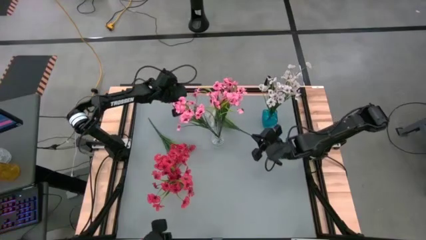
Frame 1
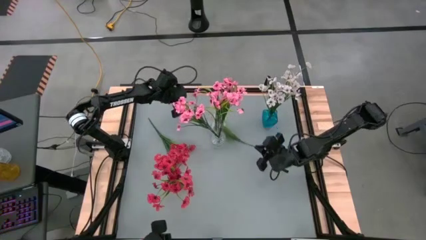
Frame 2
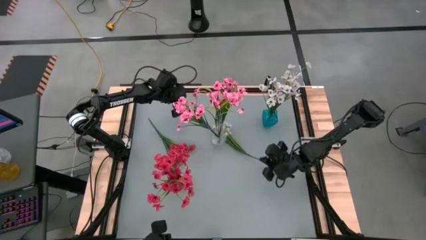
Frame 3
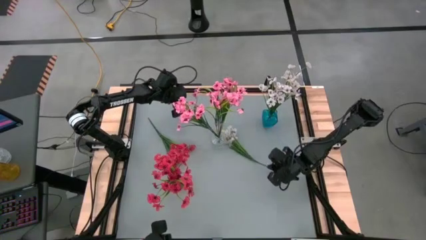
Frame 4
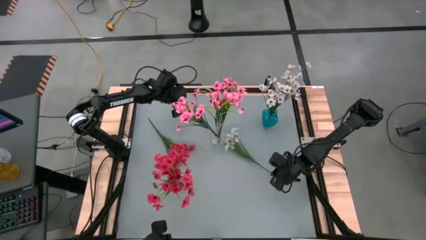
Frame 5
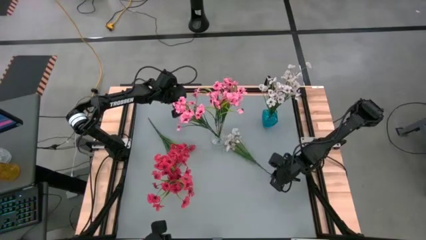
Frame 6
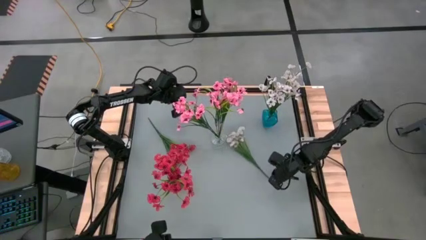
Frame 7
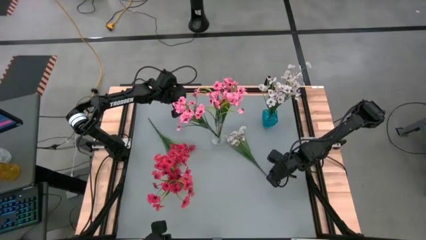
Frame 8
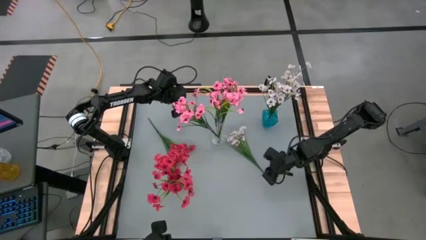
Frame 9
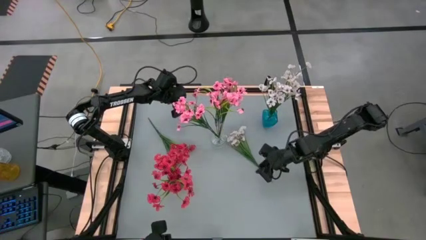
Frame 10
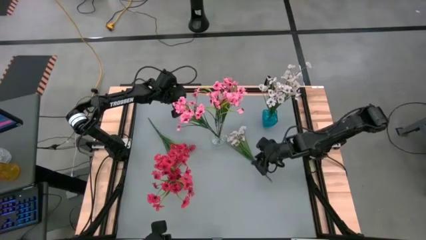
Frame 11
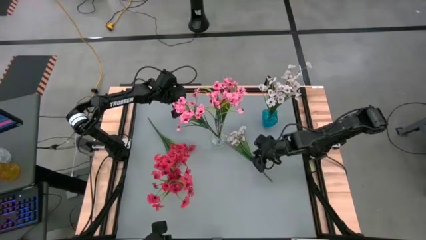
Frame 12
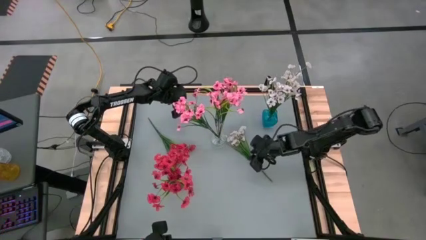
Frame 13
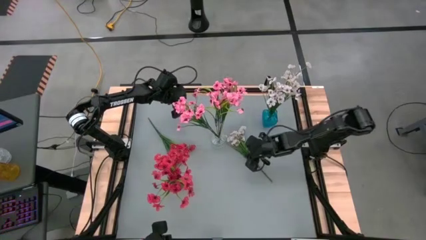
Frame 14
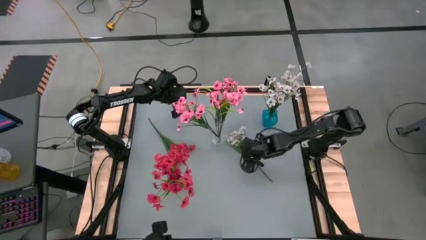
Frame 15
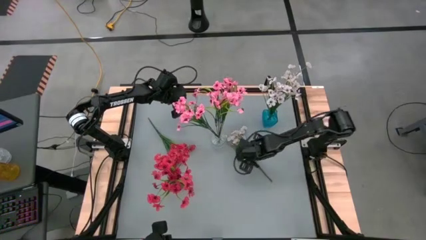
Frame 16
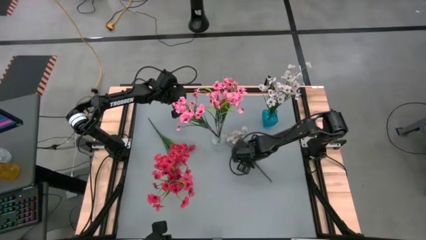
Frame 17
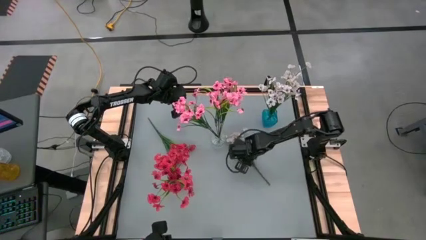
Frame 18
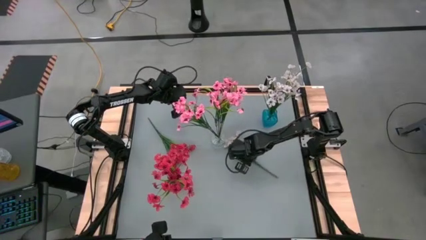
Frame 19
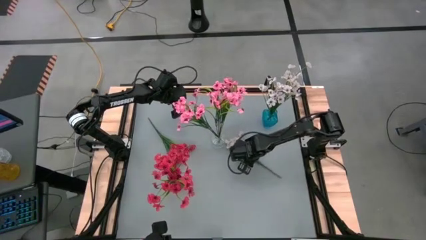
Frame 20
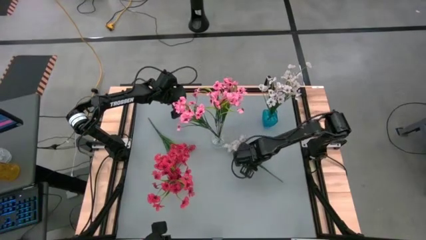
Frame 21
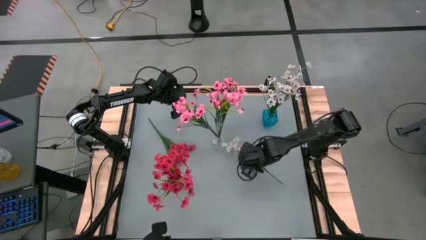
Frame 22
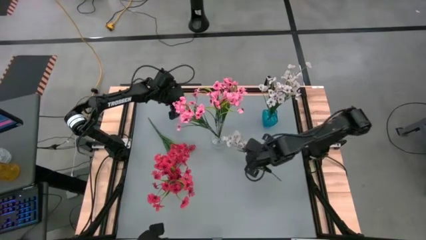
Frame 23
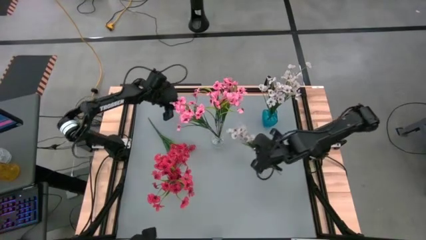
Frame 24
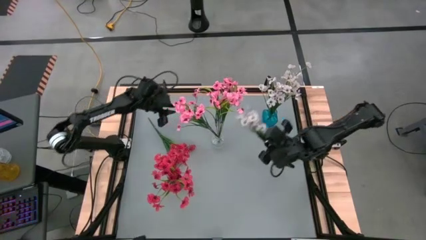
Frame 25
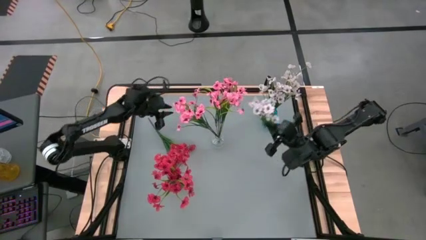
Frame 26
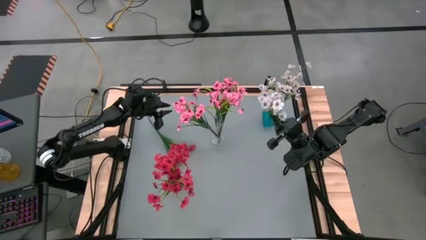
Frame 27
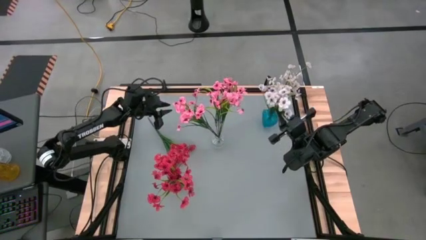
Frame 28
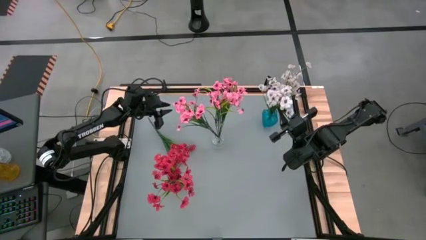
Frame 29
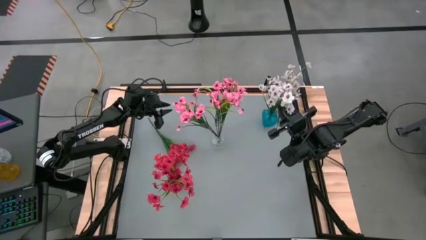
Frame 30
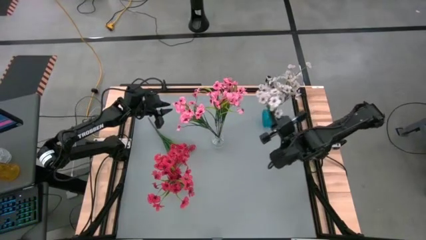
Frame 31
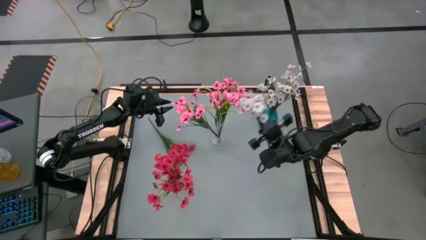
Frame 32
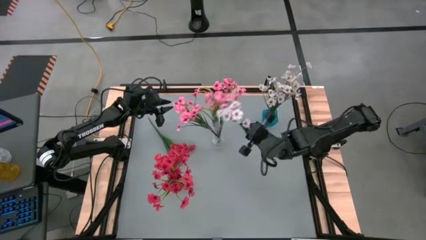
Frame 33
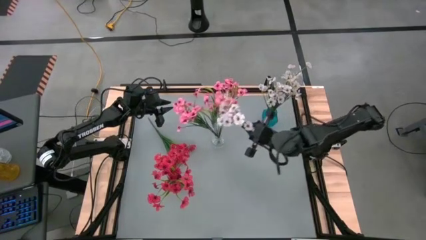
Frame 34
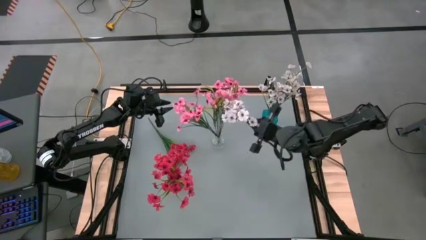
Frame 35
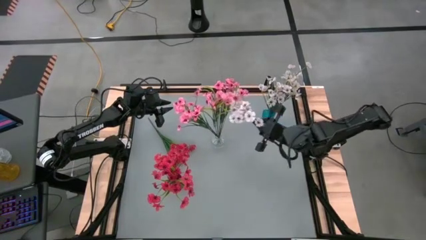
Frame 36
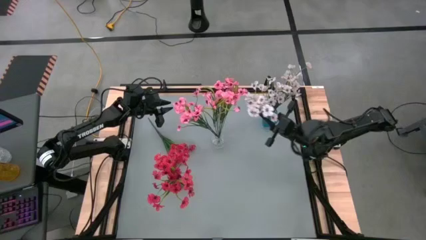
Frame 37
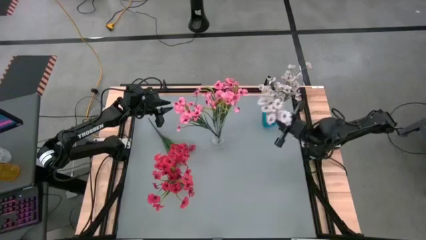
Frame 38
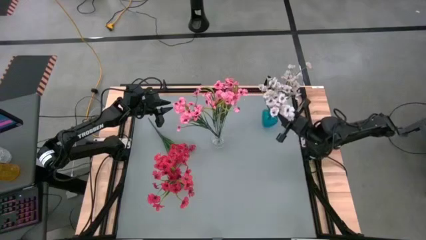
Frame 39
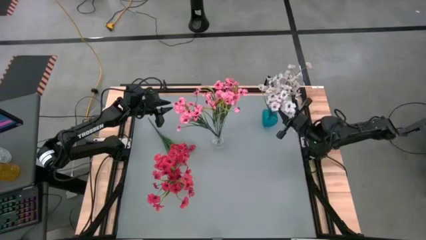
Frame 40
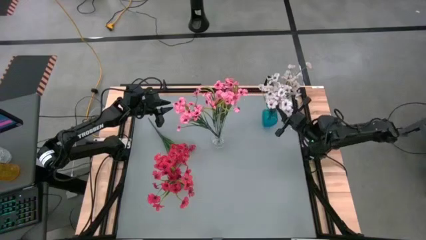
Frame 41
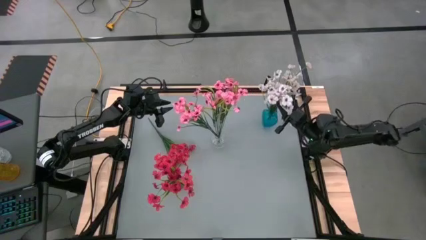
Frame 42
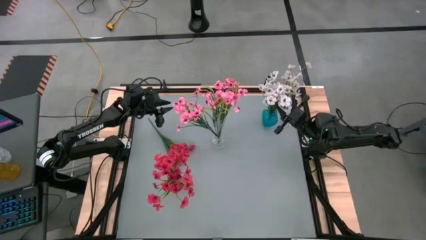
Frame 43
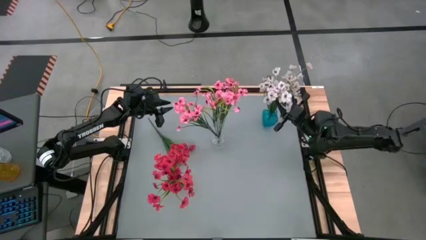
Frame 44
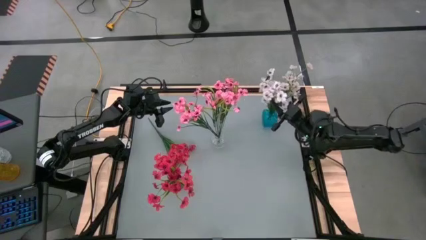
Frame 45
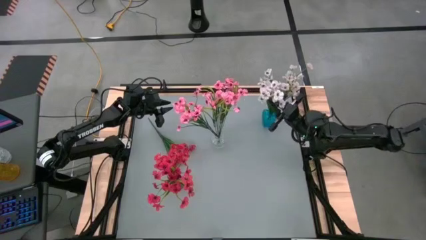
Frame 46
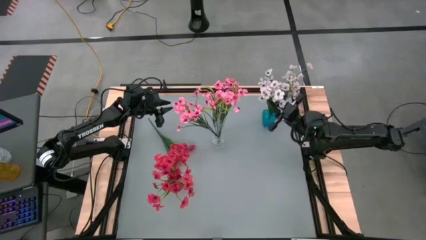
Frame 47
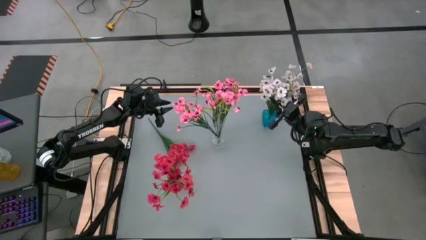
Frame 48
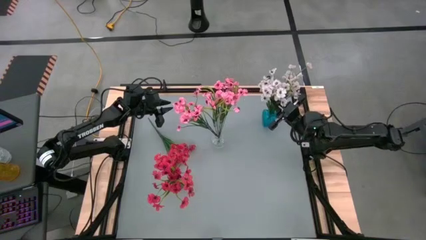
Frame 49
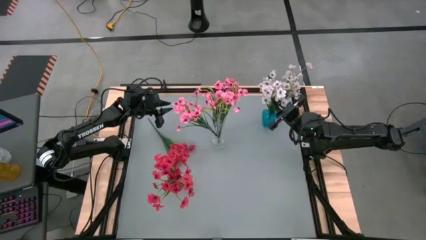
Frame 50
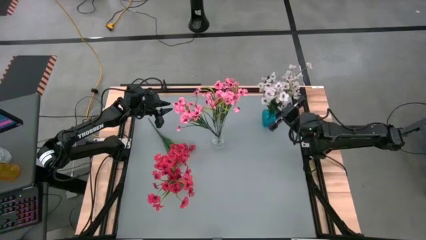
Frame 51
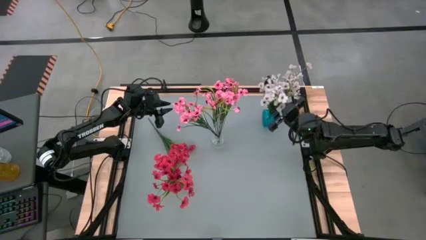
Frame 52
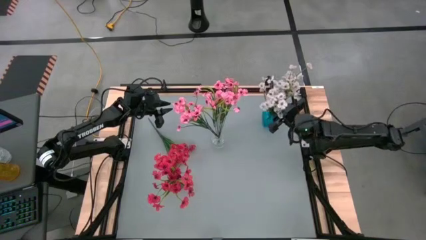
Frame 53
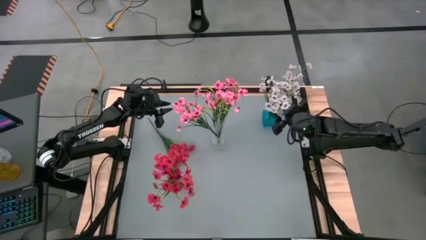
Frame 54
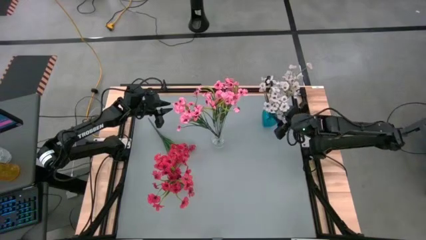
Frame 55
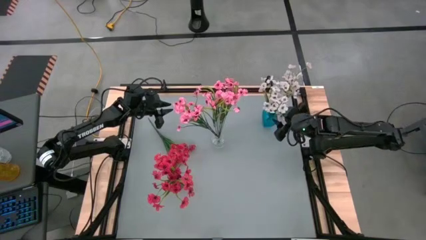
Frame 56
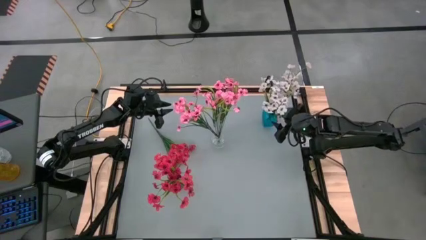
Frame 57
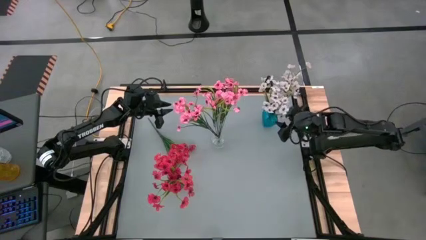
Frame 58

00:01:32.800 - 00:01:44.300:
Task: Sort flowers into vase by color
Put the white flowers into the blue base

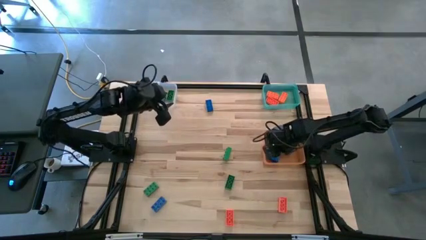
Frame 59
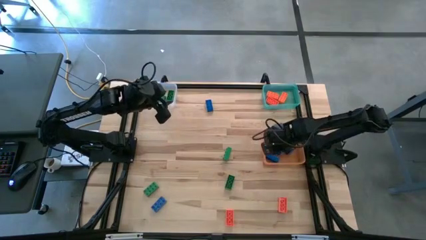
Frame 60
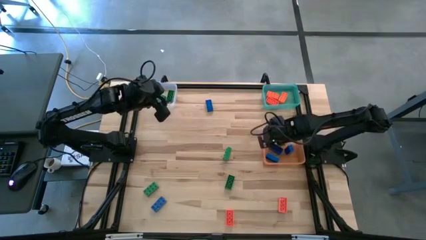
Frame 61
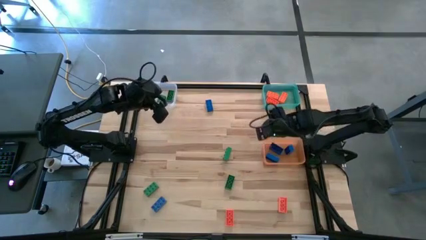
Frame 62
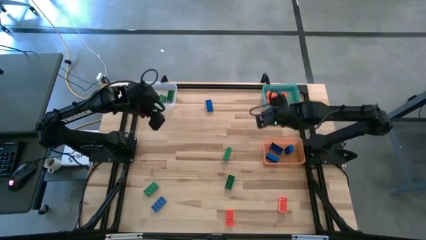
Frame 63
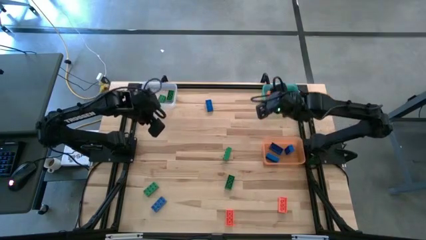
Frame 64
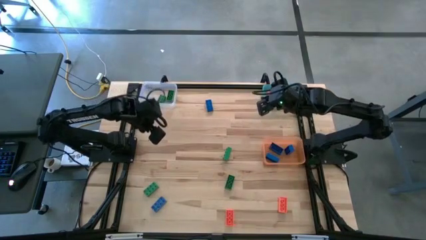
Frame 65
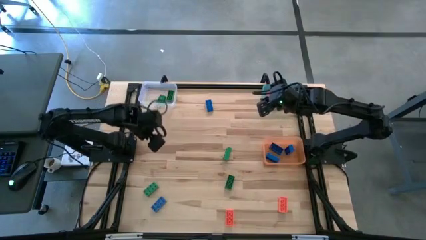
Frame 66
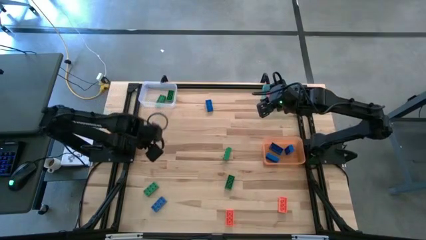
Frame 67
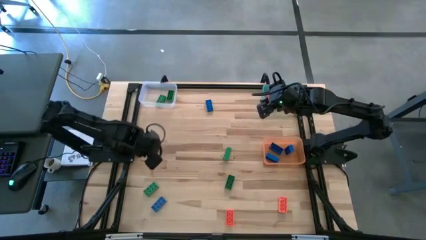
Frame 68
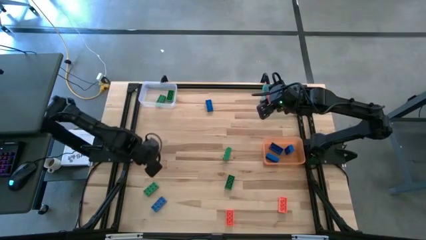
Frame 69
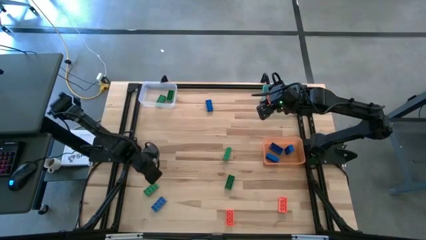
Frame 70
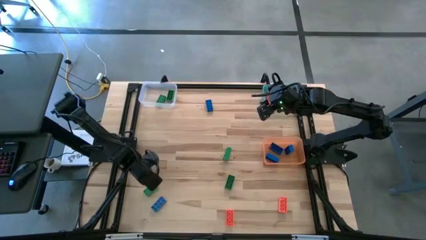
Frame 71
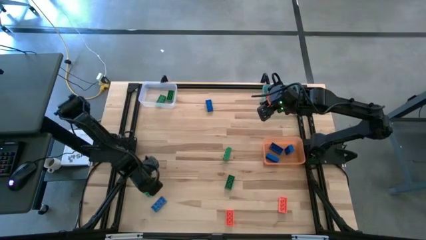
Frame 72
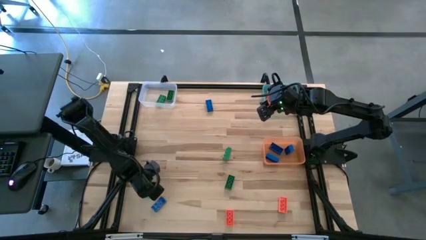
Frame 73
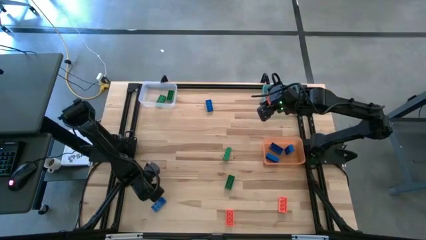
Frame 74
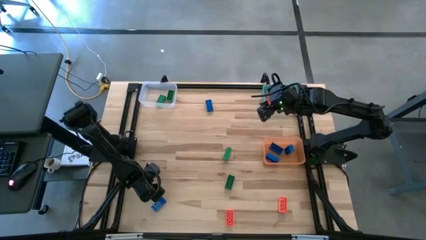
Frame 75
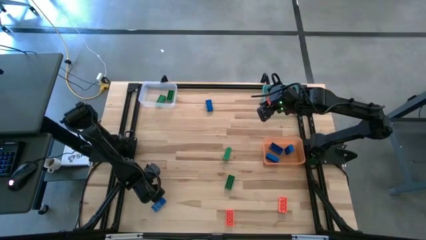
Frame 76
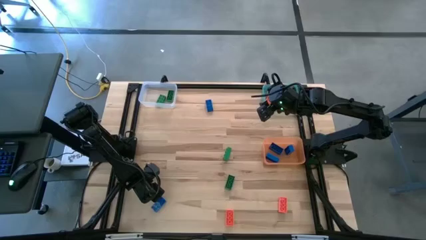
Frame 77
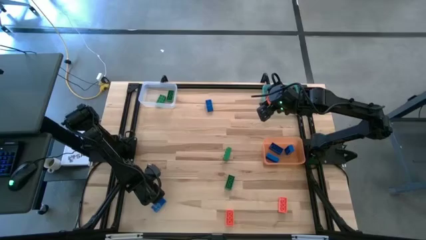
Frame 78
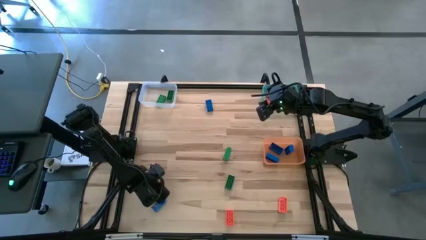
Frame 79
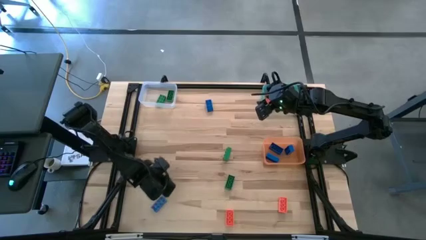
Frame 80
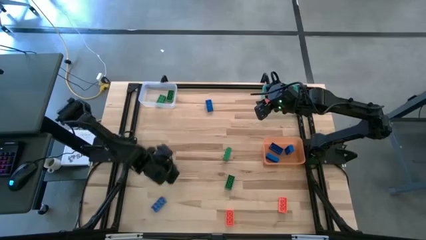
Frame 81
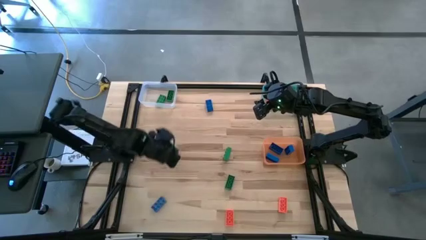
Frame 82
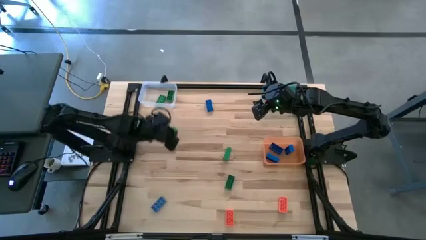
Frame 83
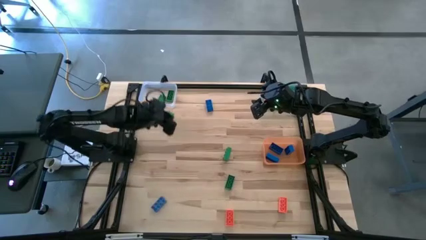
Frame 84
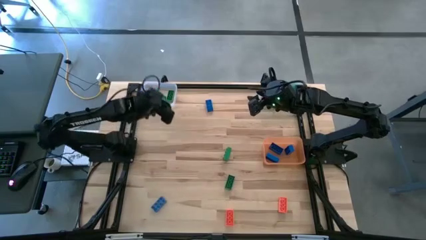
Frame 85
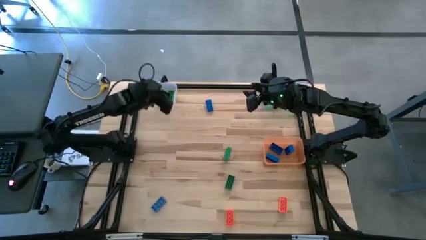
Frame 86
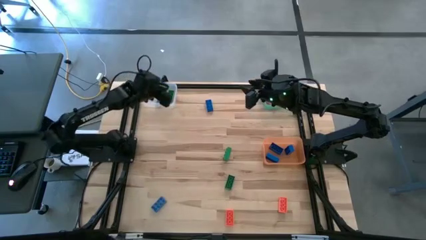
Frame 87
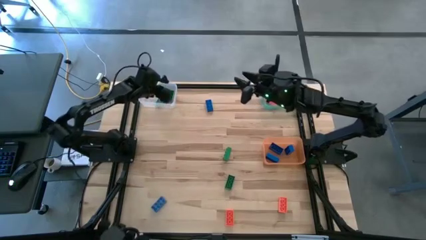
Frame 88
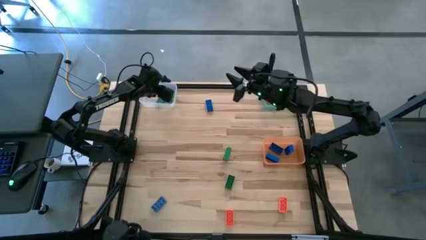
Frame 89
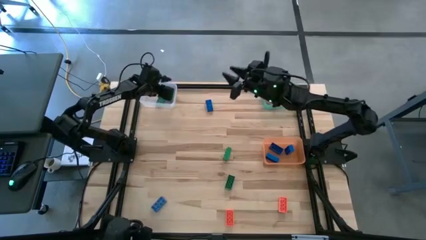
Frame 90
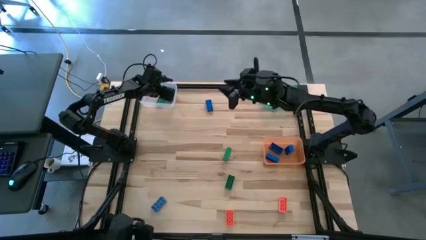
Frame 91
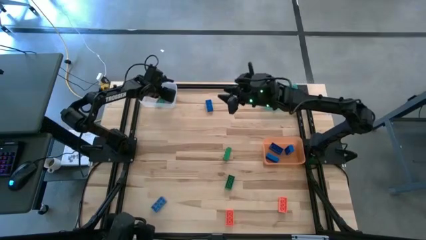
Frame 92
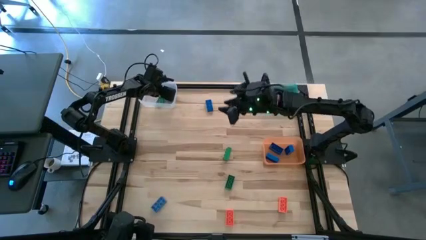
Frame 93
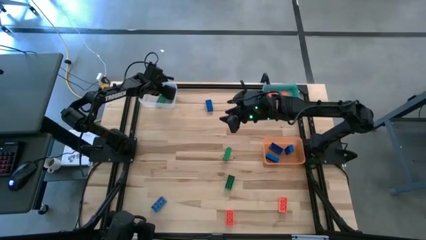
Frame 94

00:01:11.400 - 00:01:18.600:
Task: Sort & place blocks by color
Put the green game piece into the transparent bin
